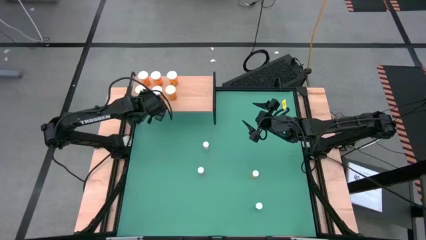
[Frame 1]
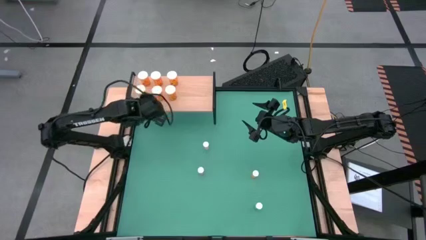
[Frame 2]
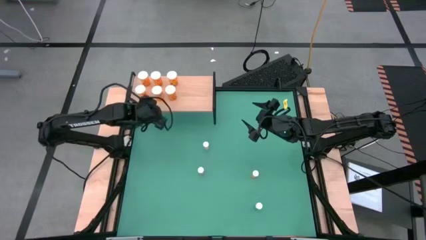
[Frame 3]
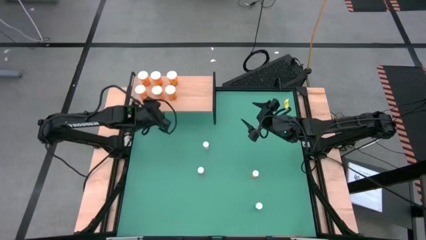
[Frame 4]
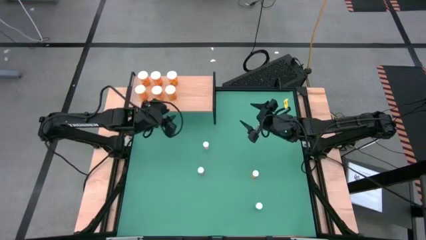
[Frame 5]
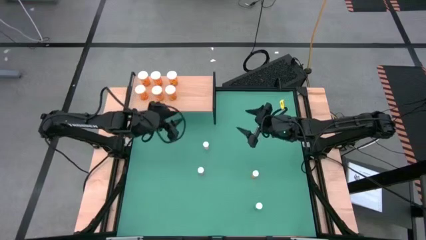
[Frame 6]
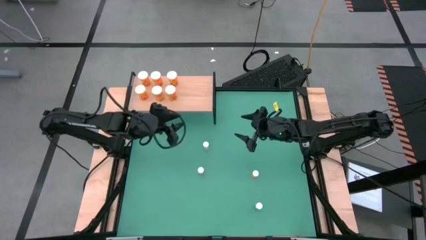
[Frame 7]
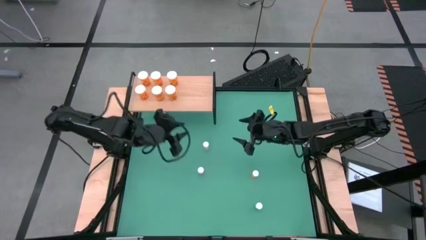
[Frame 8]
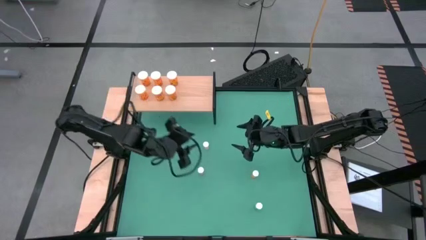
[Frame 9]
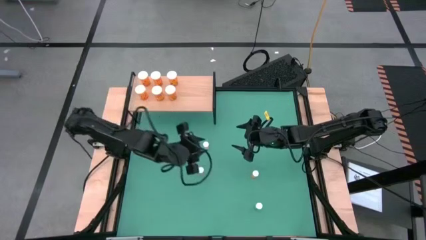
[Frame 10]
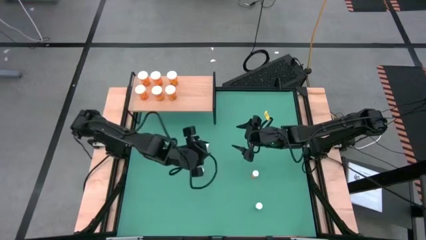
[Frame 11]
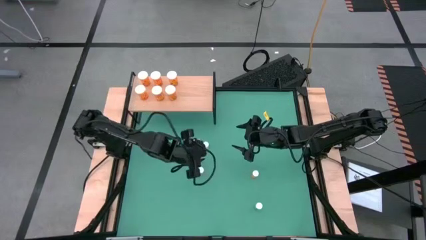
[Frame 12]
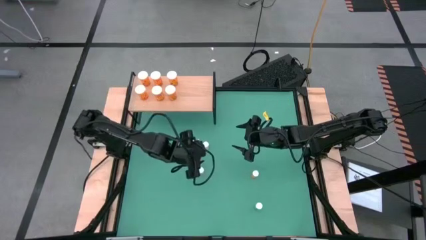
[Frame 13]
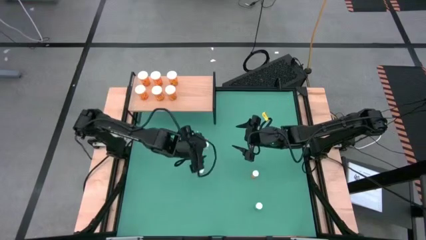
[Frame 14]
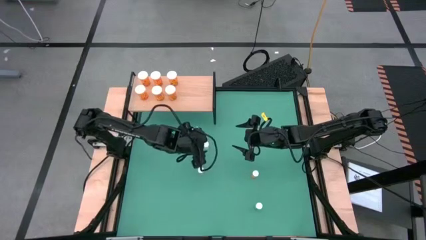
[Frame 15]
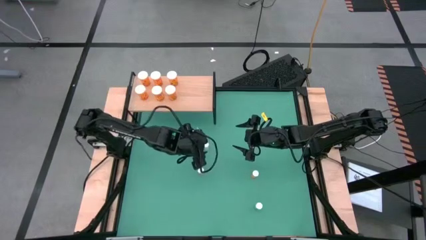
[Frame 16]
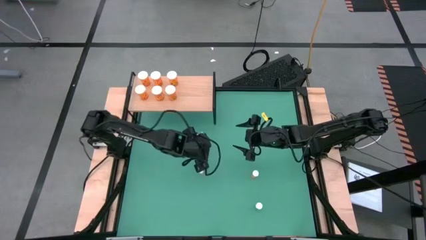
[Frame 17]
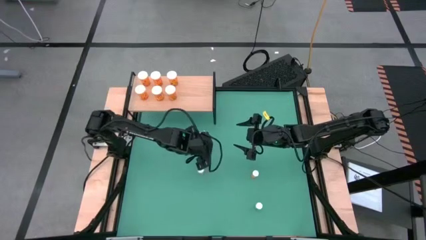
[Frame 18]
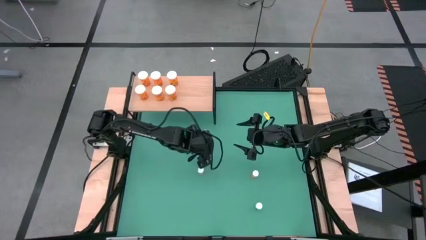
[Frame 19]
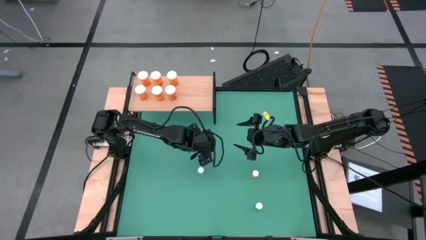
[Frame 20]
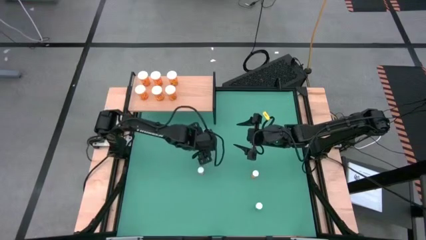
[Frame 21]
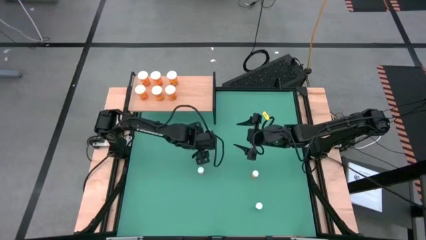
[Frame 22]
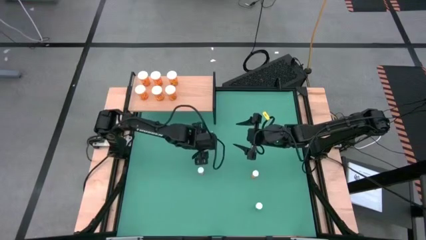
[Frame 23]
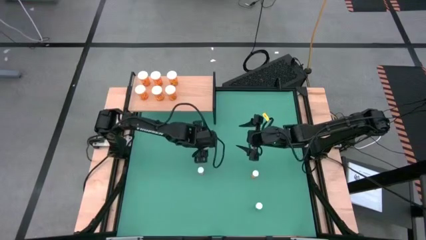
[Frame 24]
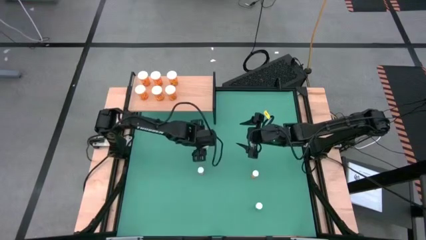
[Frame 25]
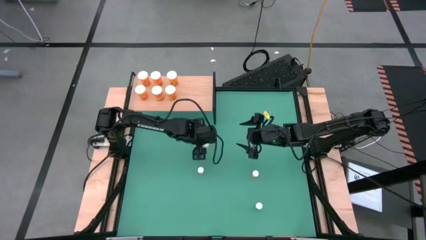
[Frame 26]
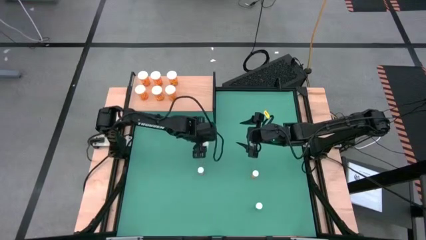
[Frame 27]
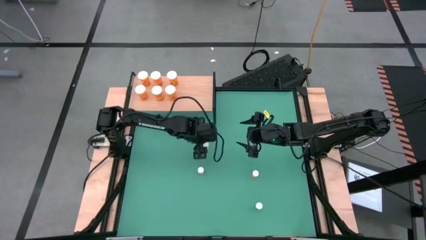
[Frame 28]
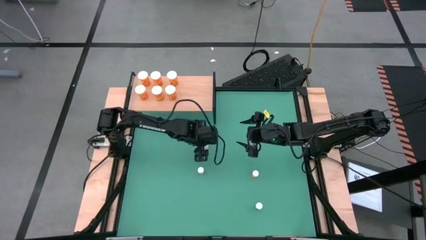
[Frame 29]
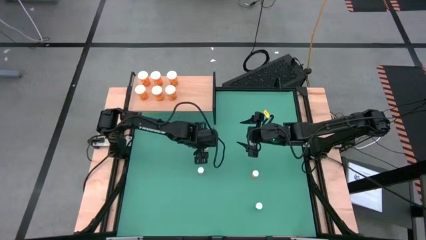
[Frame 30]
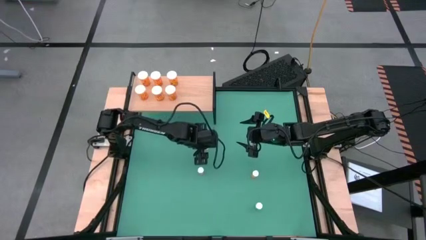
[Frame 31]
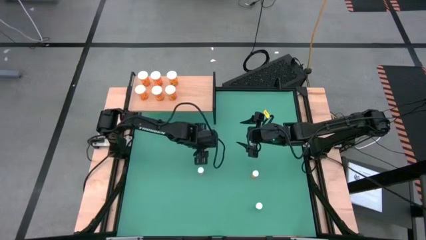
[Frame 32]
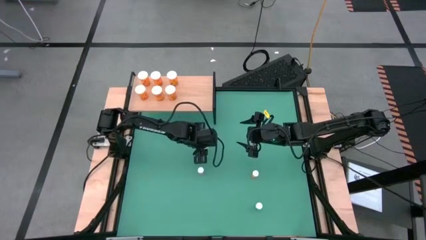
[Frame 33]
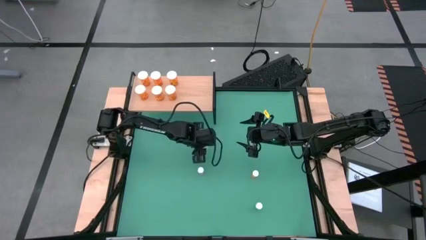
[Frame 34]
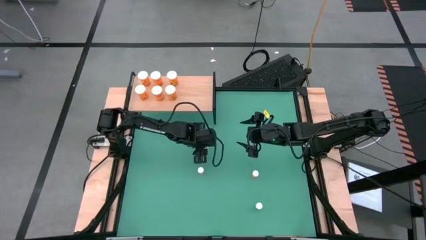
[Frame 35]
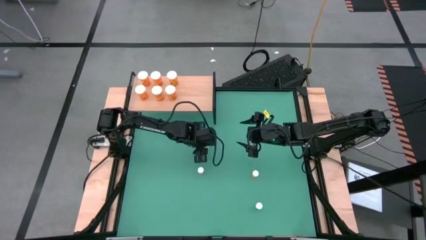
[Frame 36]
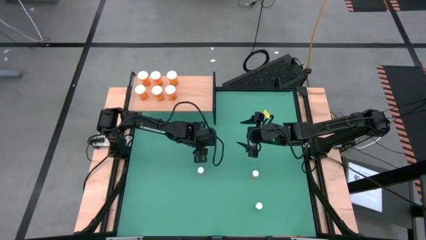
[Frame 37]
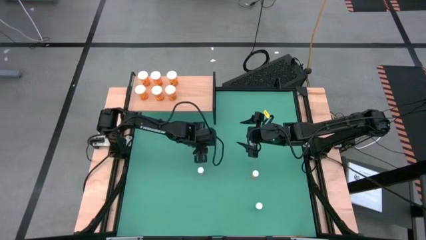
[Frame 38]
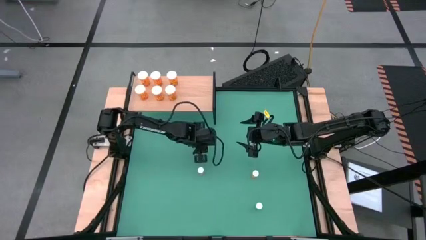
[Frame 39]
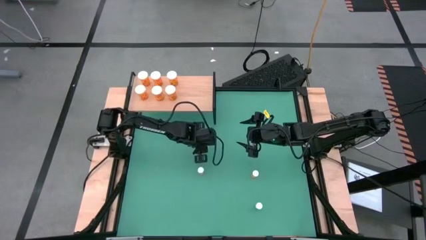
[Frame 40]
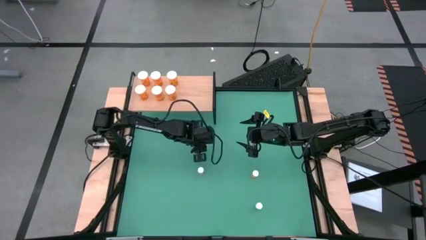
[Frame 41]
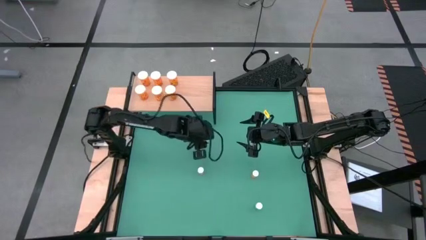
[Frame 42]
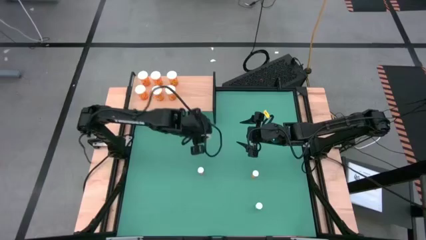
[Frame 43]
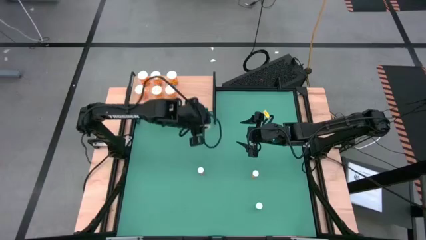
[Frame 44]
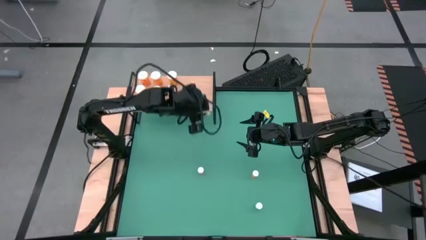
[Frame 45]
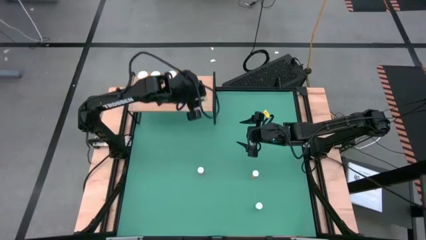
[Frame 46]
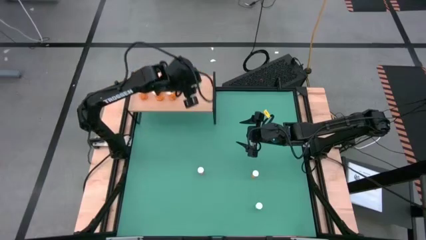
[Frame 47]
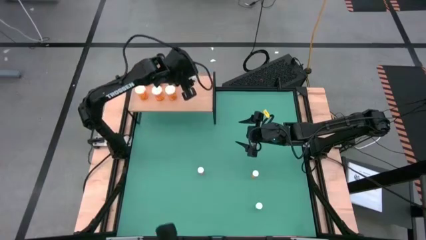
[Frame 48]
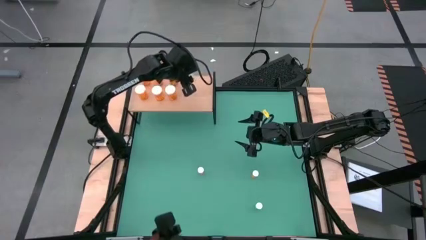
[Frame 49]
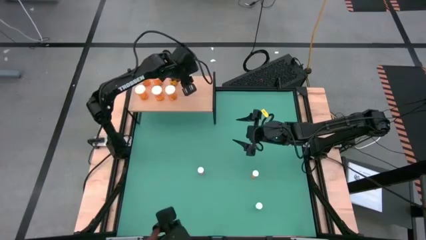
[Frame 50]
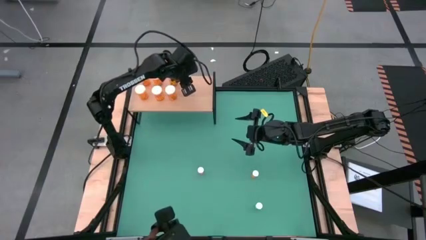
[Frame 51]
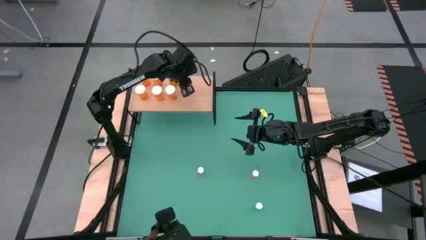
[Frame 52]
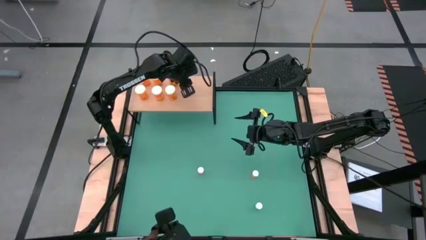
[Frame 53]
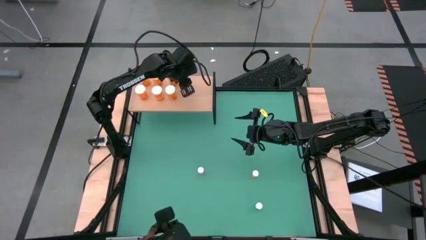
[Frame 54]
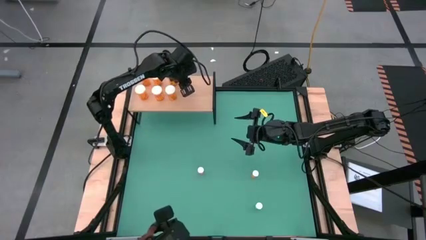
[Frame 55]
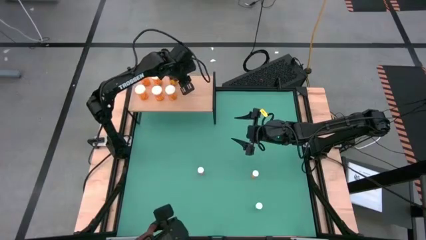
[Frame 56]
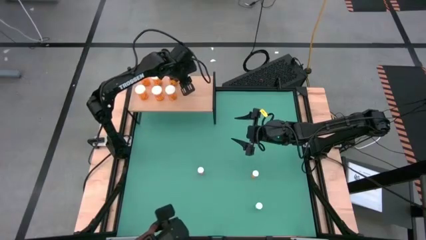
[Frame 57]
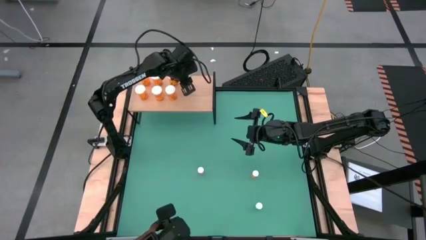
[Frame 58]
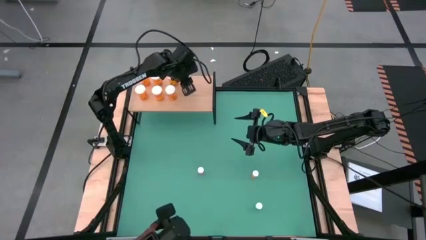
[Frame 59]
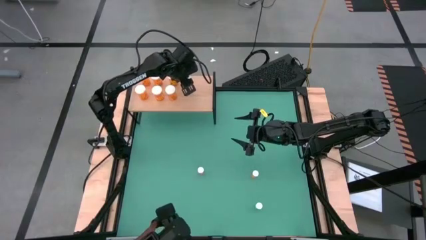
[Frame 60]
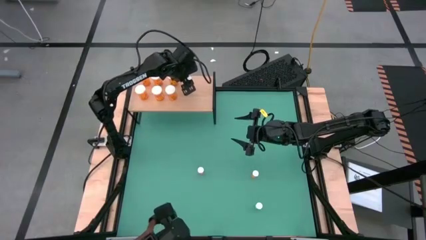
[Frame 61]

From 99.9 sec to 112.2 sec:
Task: Pick and place medicine bottles onto shelf by color
Put the small yellow pill bottle on the shelf aligned with the other big orange pill bottle
